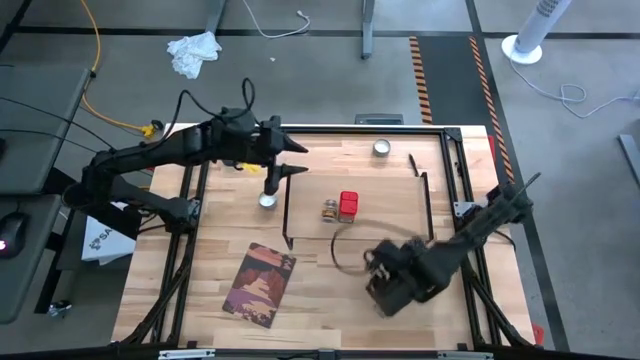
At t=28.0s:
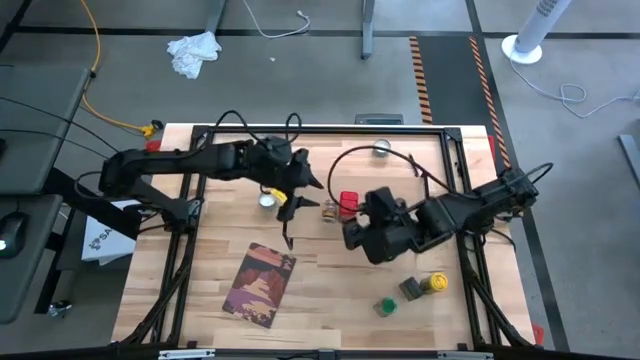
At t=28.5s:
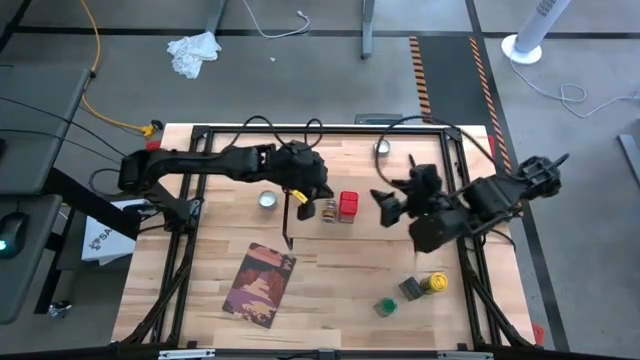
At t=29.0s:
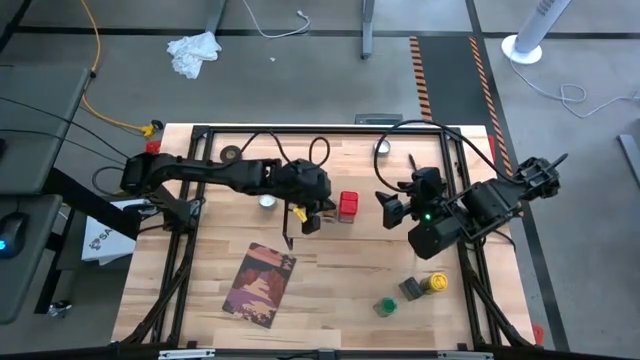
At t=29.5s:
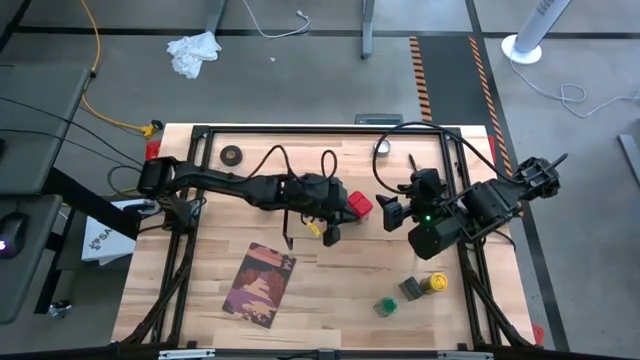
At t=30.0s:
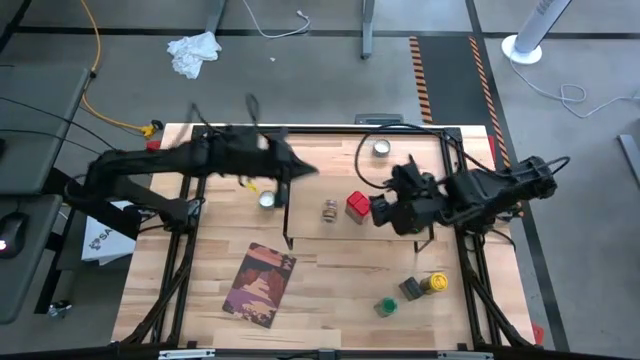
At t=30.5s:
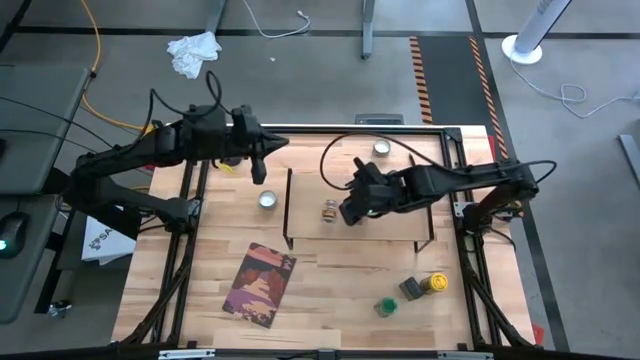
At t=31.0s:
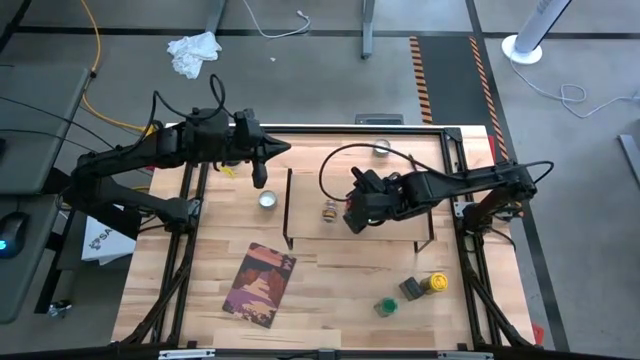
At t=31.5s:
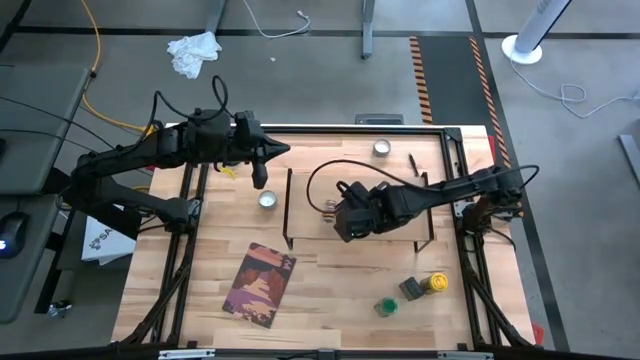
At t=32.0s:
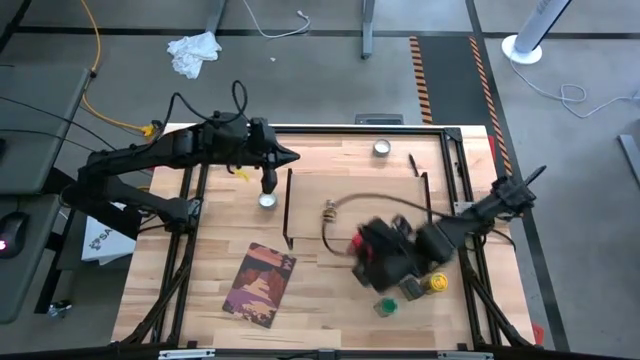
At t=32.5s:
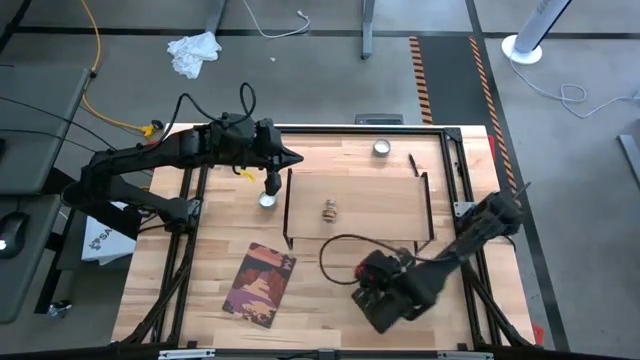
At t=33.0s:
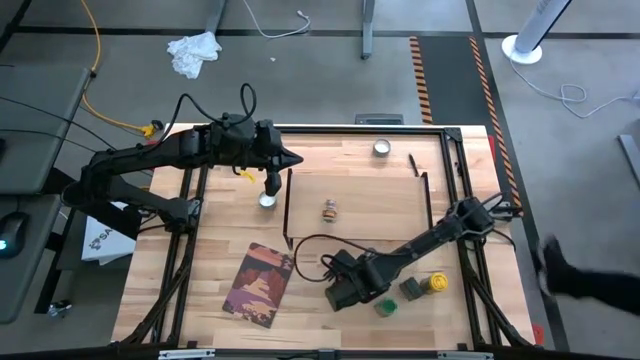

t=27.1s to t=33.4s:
Task: Shelf spices
Remove the red seasoning can from the shelf

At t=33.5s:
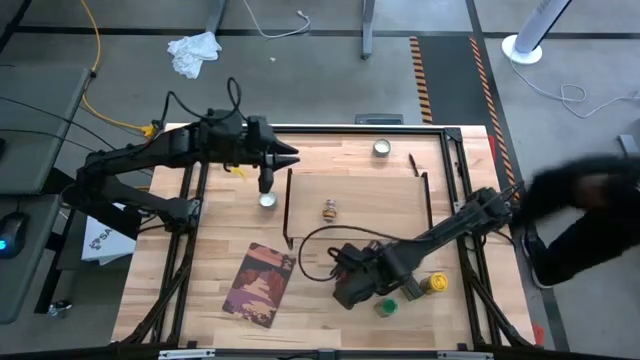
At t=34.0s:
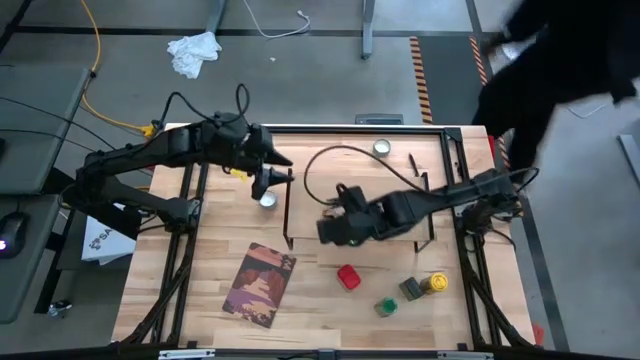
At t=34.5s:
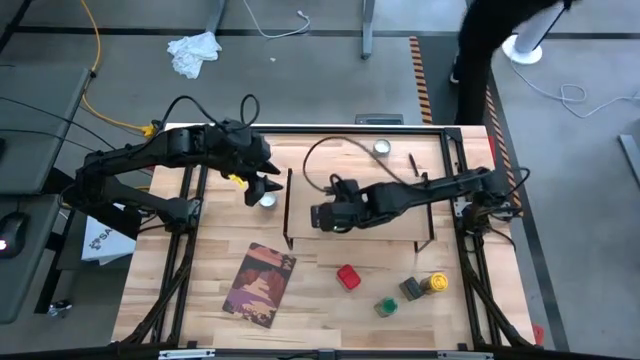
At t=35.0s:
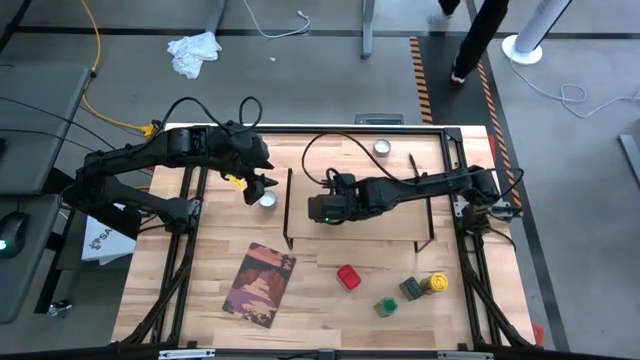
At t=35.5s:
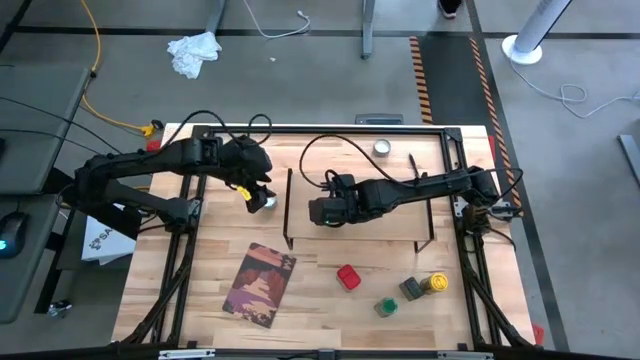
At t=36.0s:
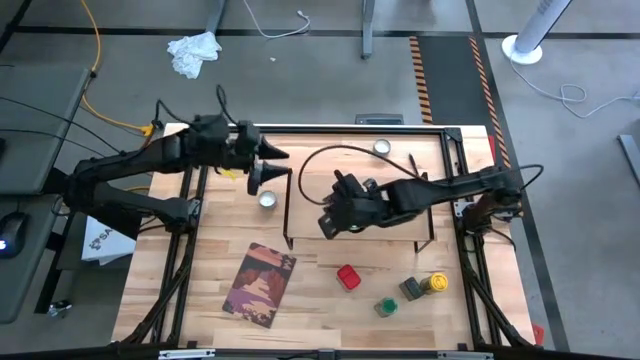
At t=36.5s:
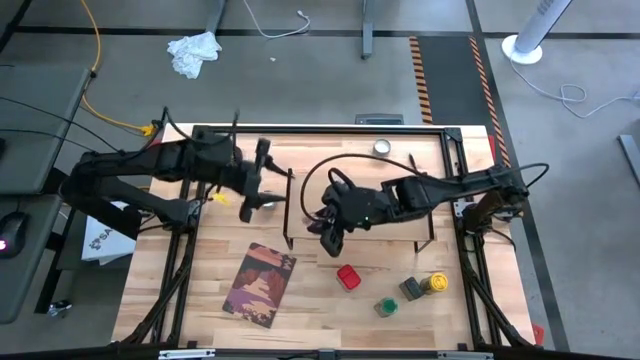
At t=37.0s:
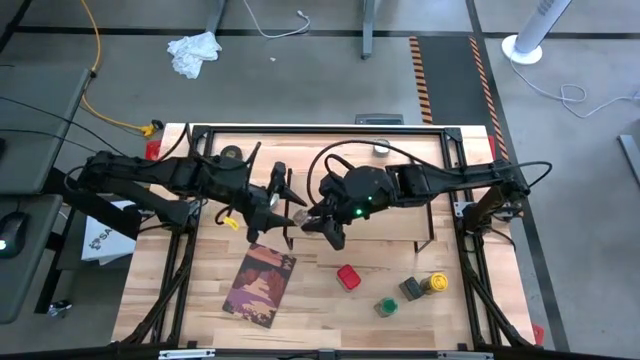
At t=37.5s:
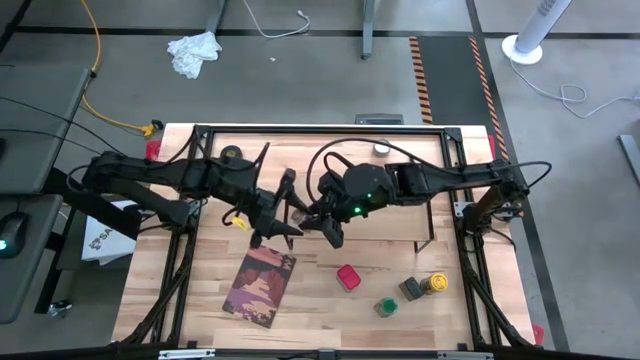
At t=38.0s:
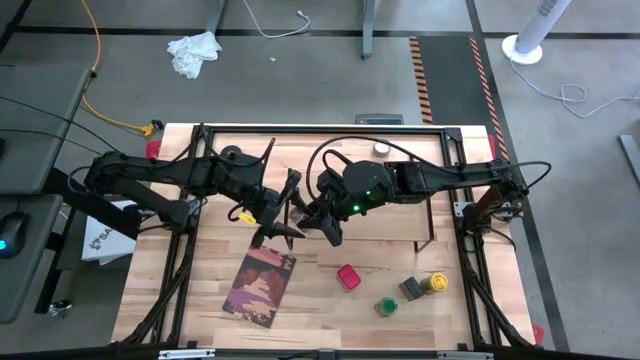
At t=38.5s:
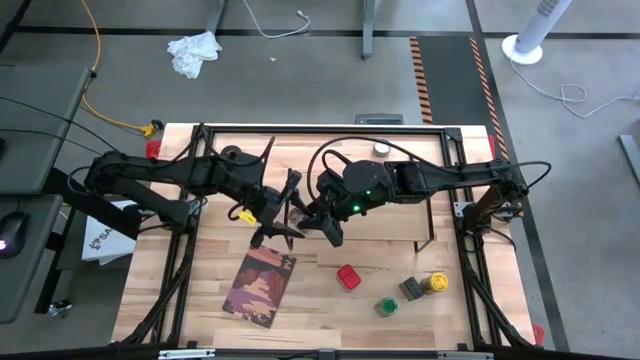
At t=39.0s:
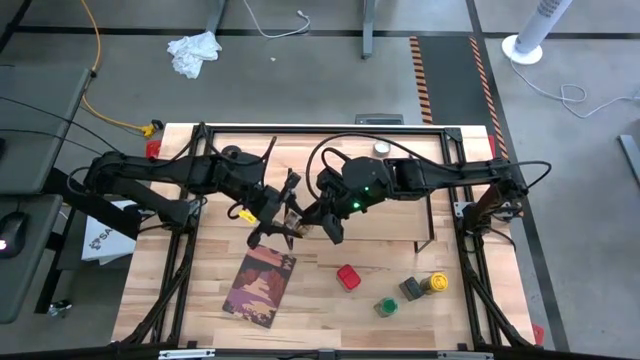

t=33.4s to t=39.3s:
Remove the brown seasoning bottle from the shelf

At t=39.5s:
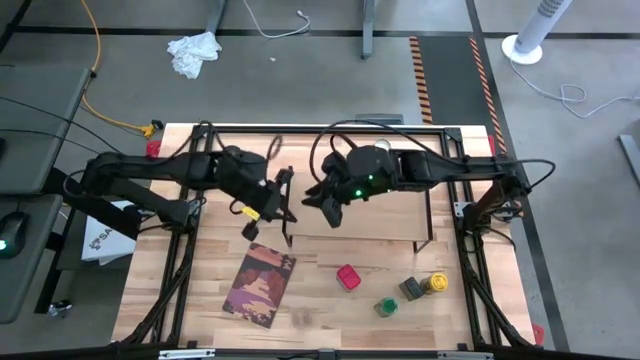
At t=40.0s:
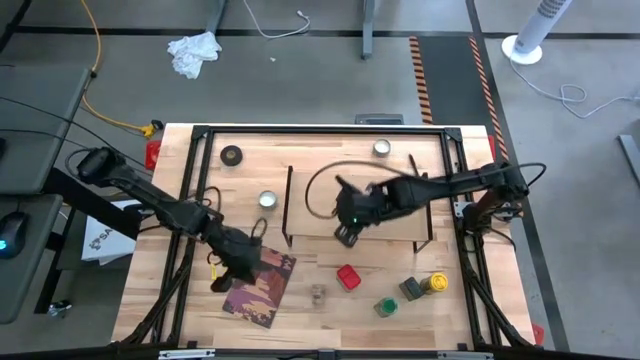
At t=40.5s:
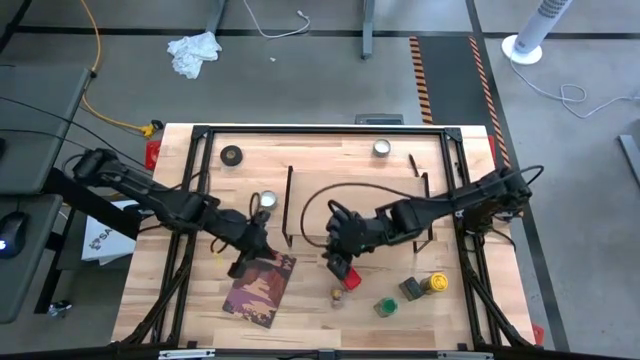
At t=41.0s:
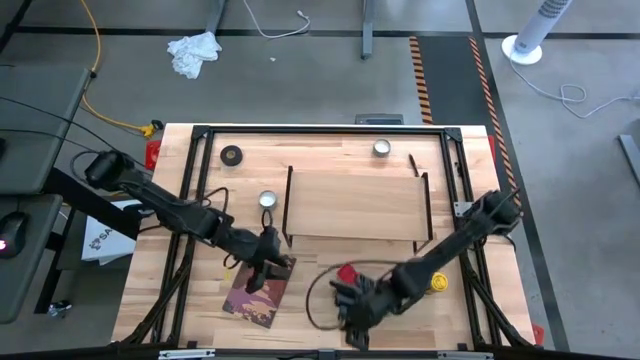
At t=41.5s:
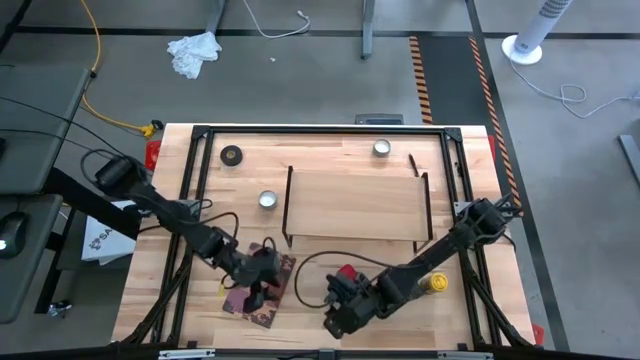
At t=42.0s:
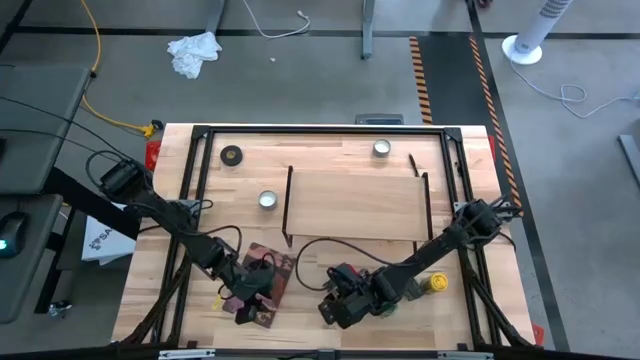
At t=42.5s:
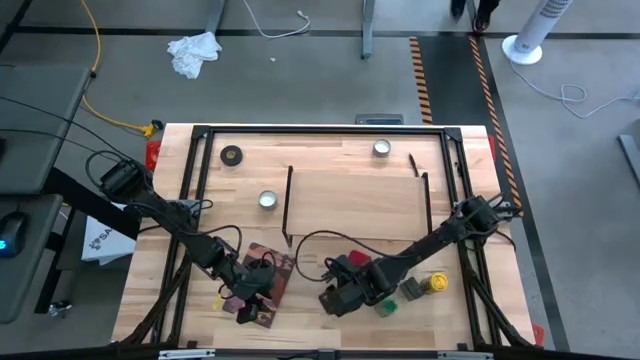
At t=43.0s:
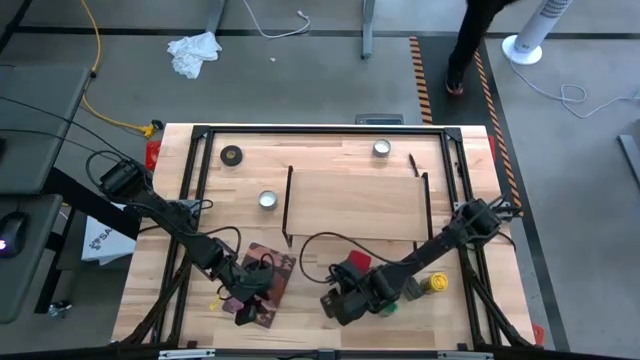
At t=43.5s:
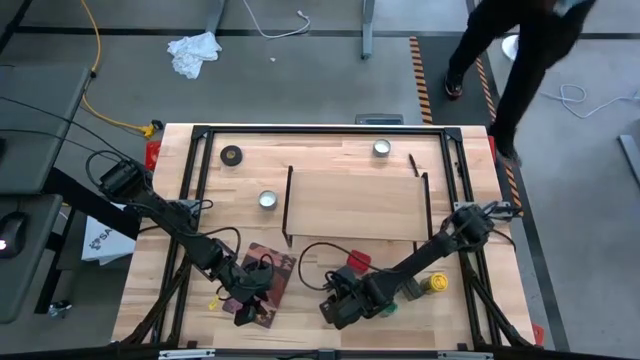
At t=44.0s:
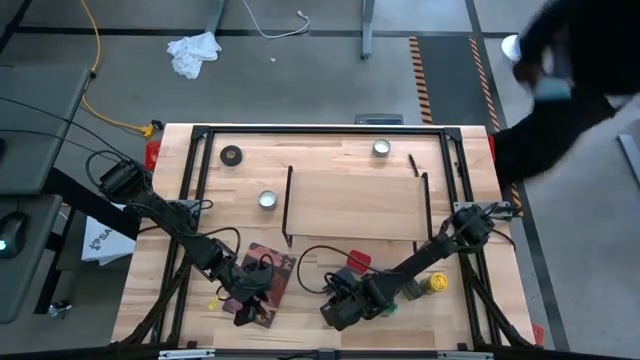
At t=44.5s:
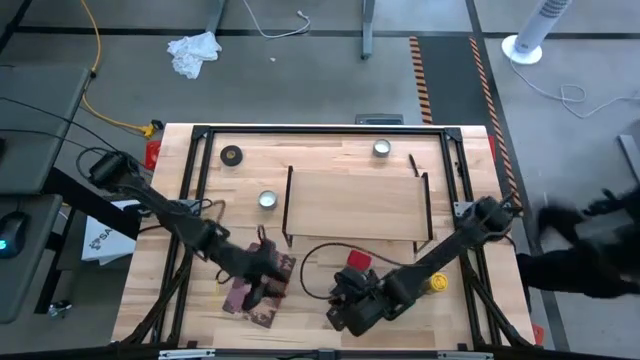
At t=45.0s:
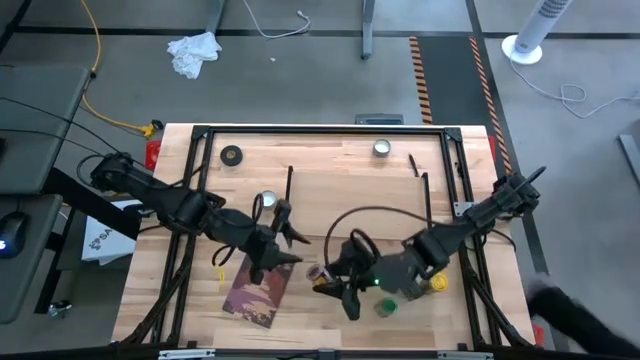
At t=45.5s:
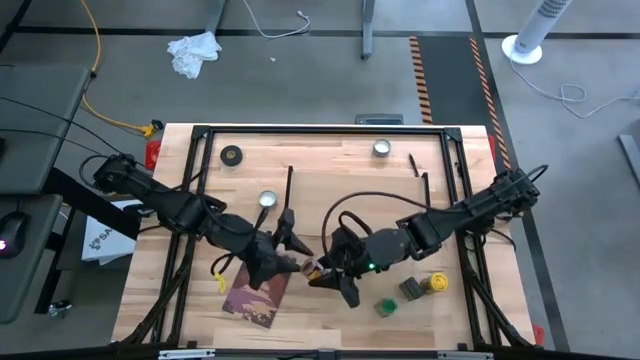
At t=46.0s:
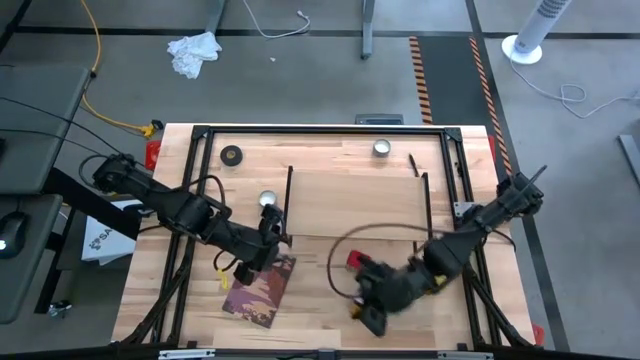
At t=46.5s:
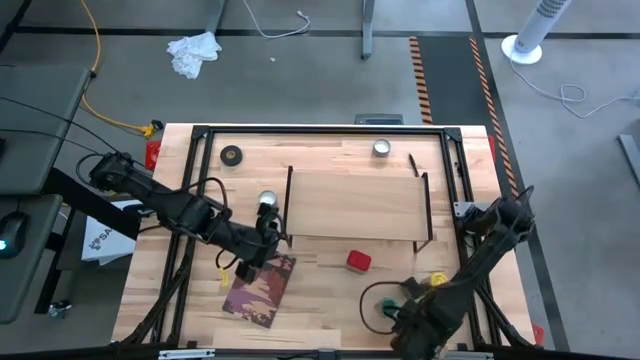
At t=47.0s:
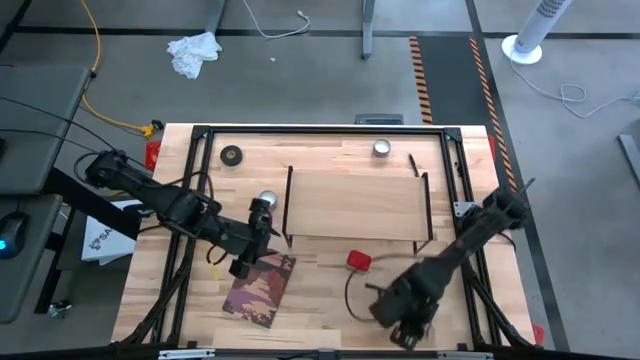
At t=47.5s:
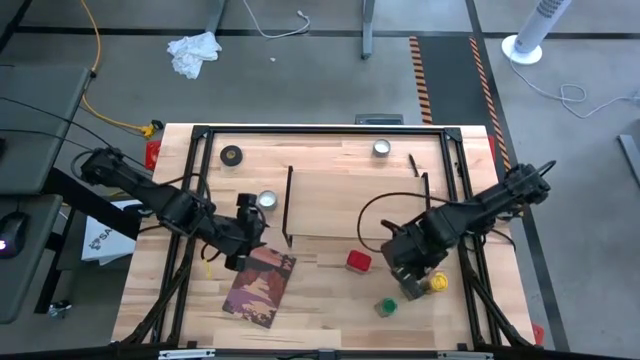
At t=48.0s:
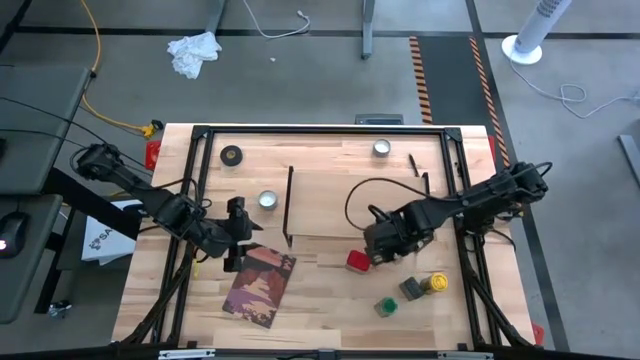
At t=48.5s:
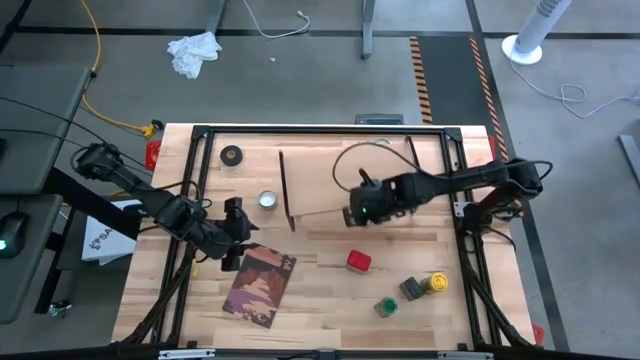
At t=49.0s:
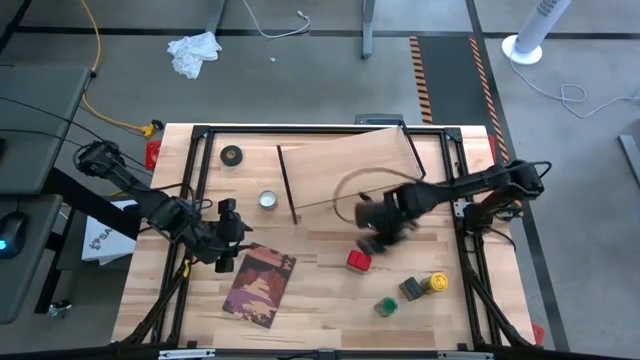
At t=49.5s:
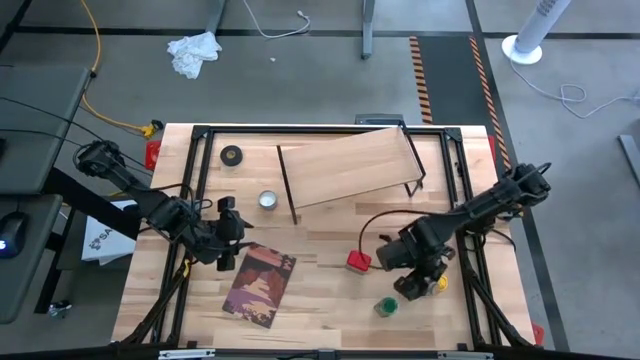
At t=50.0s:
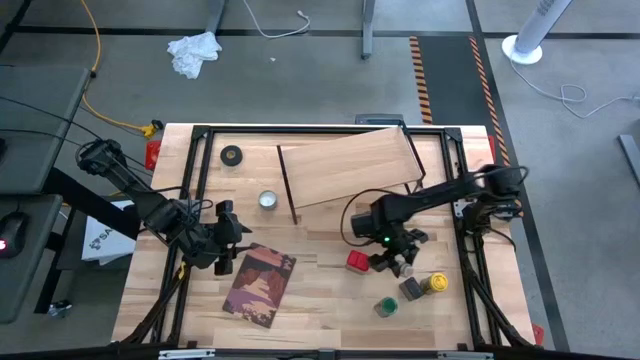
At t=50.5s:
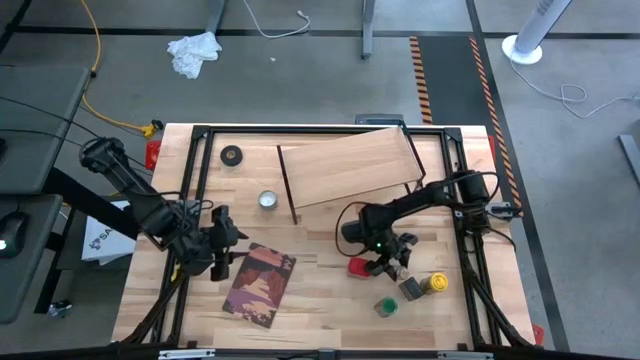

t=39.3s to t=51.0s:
Remove the transparent seasoning bottle from the shelf
